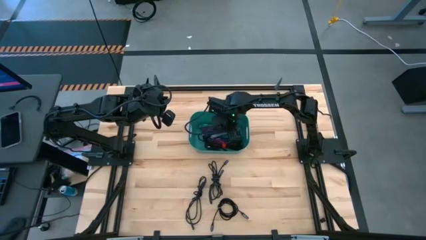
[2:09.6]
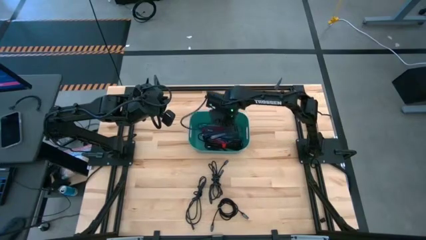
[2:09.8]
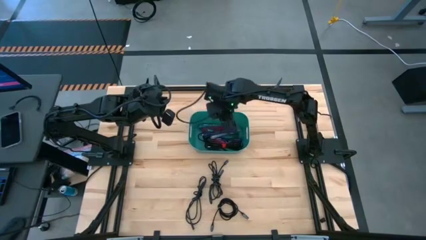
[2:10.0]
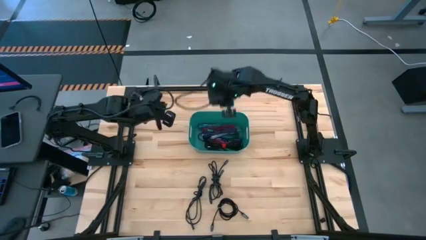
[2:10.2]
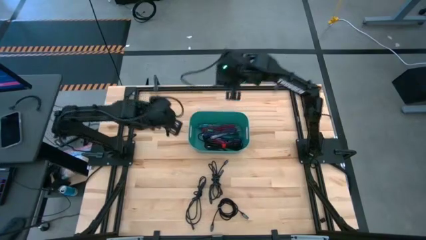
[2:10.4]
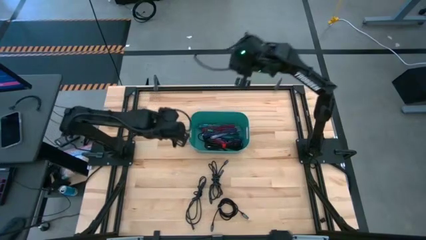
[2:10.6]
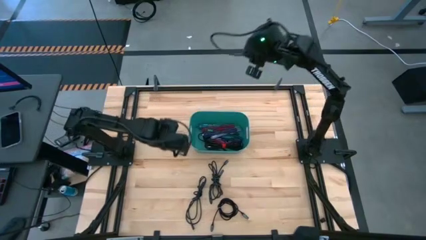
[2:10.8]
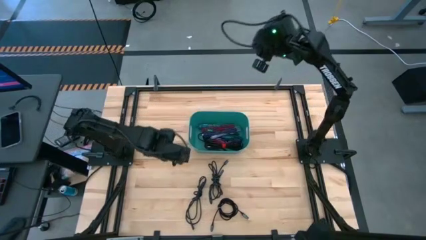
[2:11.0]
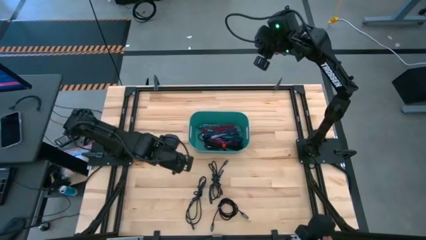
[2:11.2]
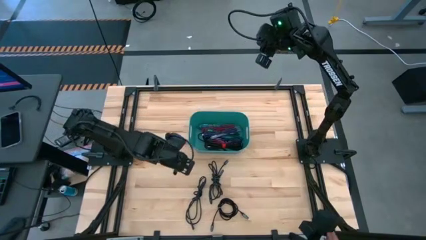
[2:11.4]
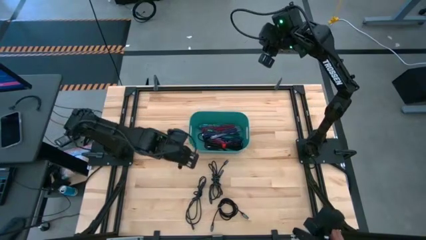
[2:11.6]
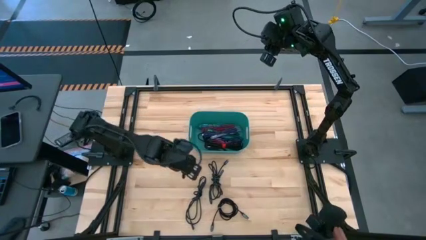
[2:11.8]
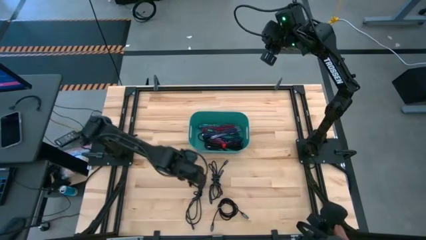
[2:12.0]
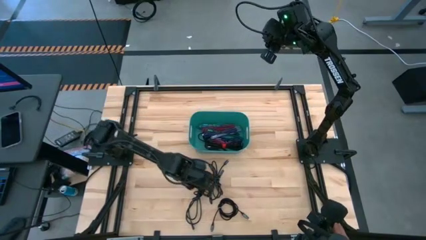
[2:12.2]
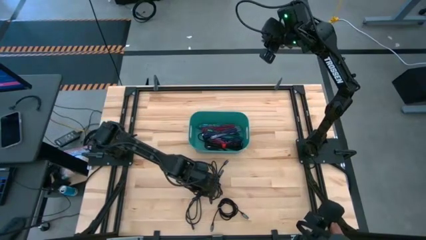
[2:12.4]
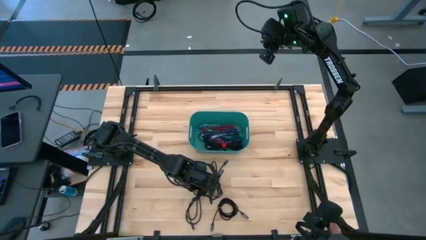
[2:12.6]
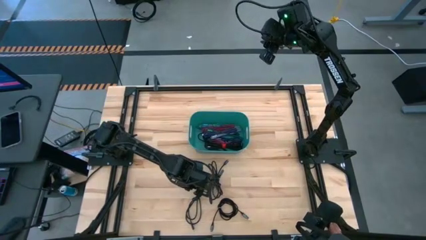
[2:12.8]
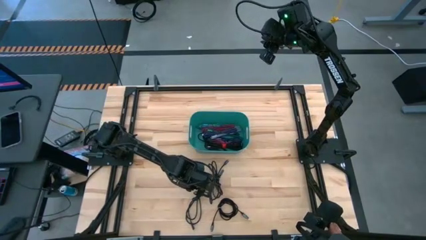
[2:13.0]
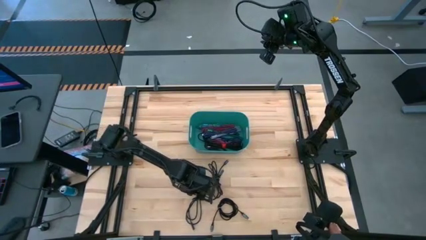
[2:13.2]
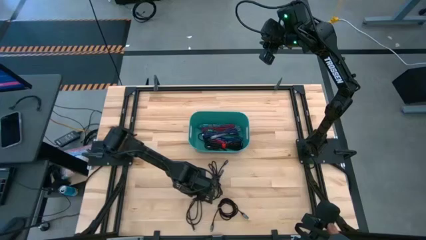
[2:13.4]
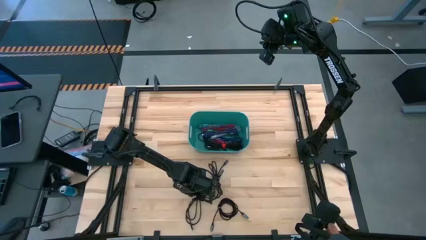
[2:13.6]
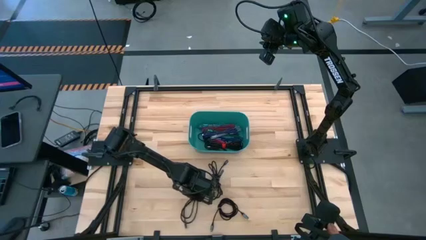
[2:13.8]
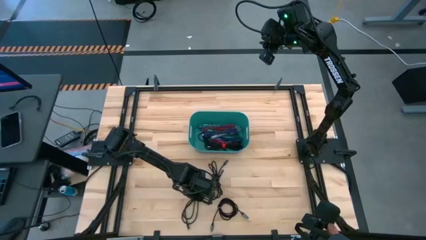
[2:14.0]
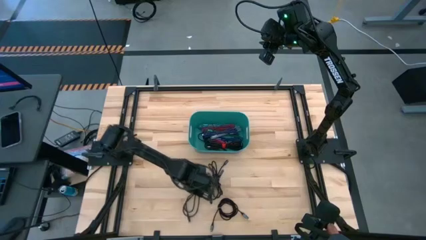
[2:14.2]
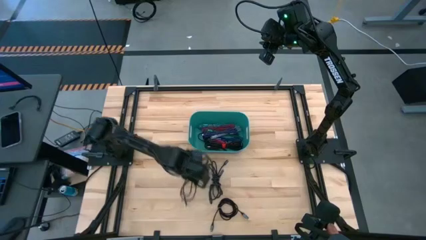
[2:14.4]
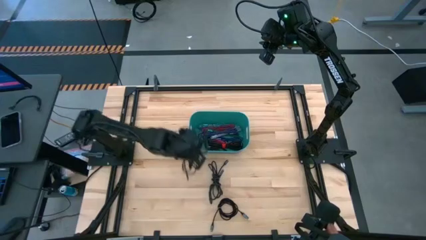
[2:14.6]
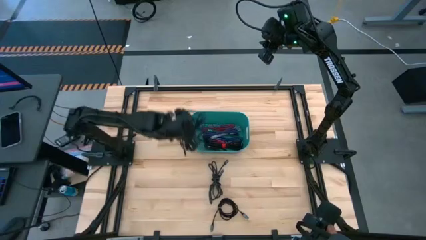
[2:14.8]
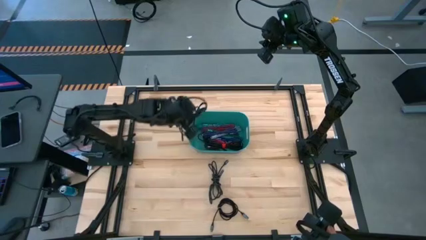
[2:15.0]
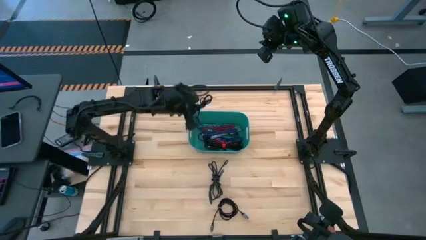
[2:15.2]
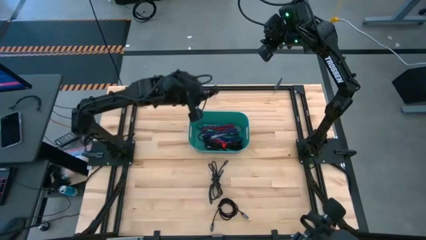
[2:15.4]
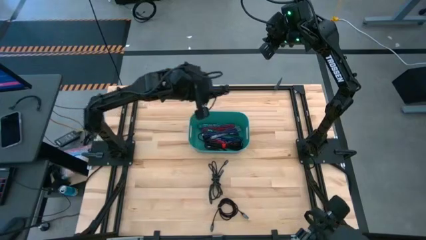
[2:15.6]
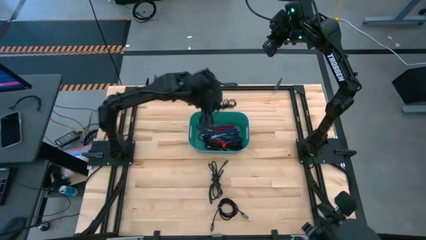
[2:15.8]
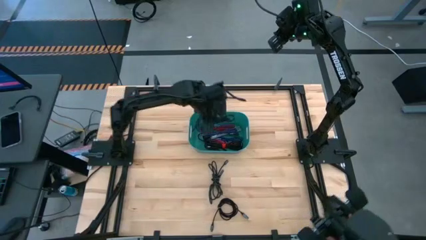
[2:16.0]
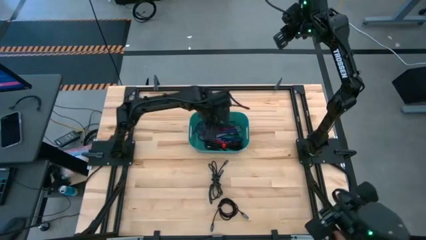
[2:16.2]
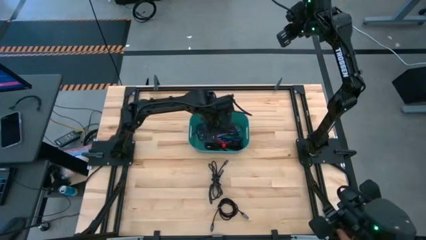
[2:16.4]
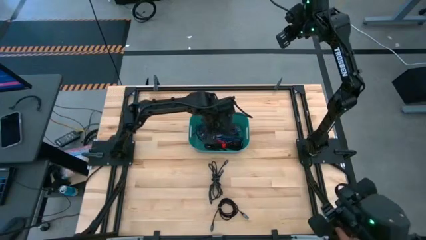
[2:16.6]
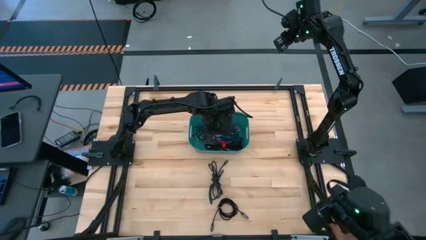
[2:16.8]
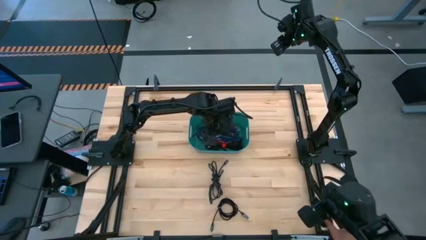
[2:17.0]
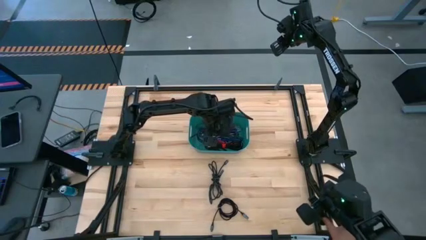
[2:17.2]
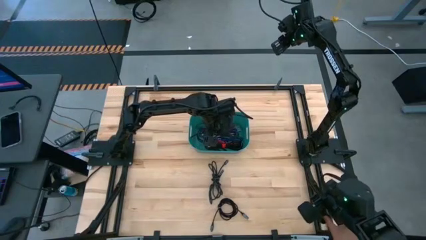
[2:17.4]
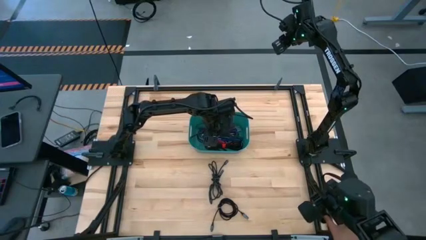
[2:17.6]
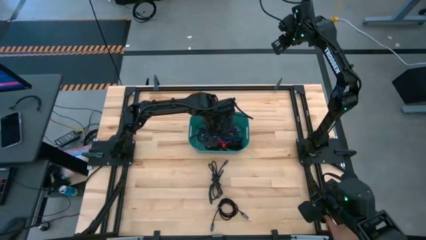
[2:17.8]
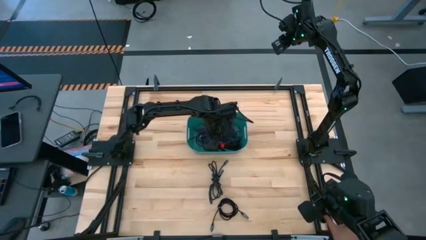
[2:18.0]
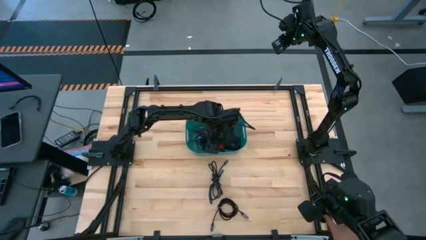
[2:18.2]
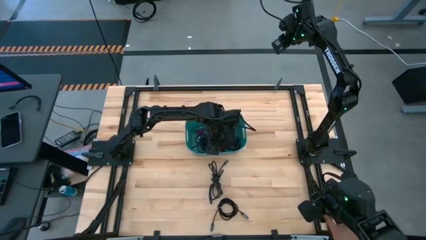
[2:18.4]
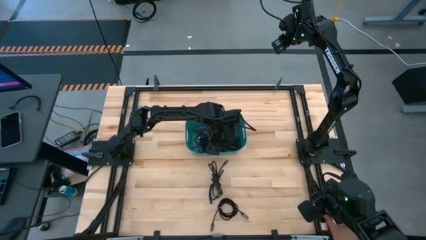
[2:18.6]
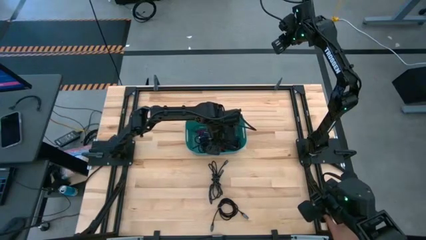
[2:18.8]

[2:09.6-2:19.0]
Task: Pick and place USB-C Cables
Put the left black charger cable into the light blue bin

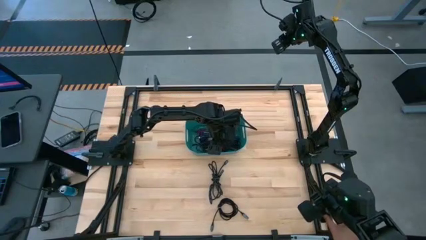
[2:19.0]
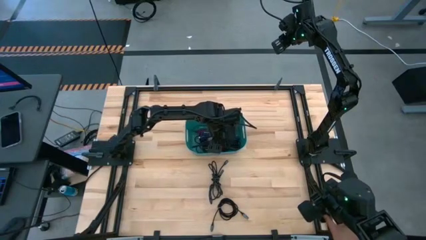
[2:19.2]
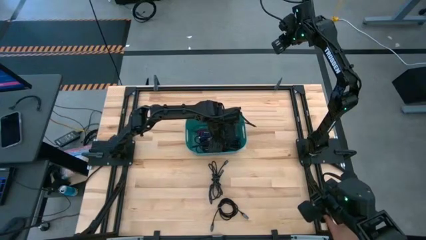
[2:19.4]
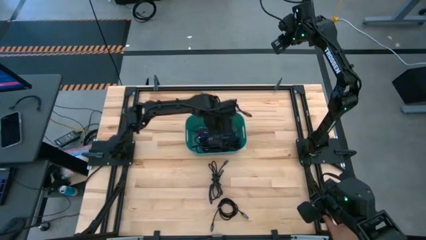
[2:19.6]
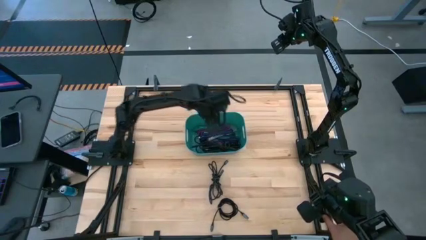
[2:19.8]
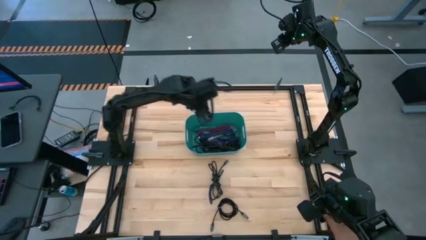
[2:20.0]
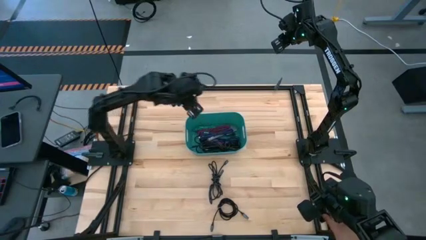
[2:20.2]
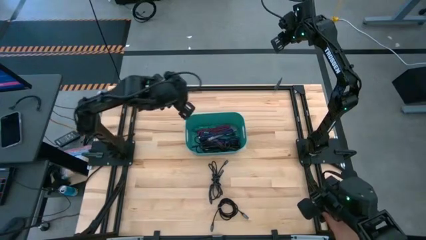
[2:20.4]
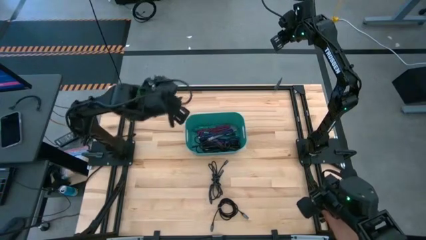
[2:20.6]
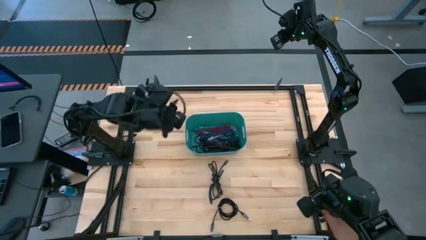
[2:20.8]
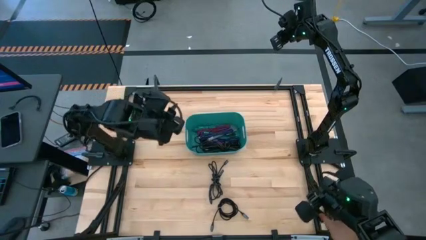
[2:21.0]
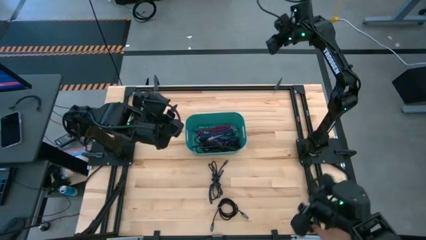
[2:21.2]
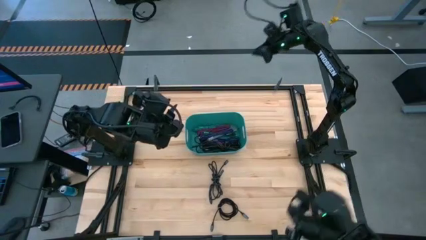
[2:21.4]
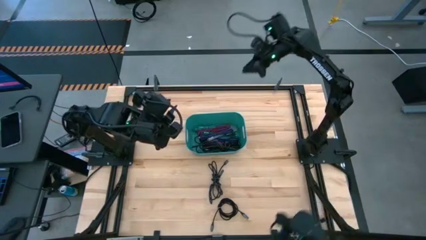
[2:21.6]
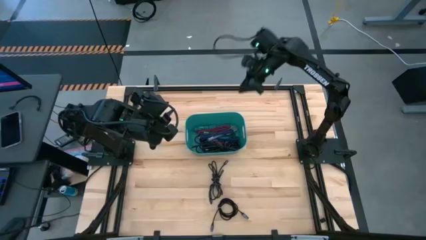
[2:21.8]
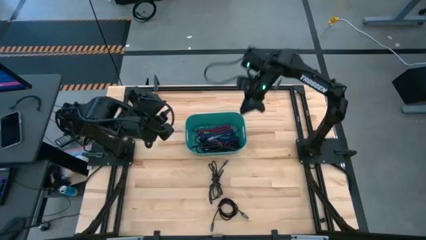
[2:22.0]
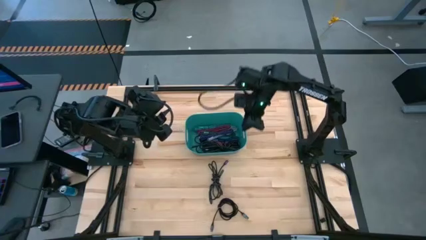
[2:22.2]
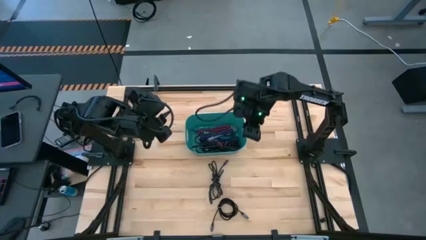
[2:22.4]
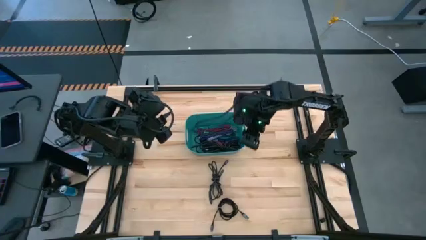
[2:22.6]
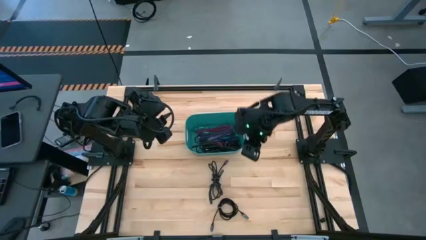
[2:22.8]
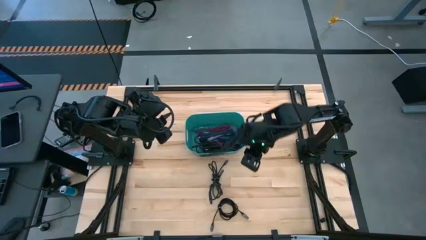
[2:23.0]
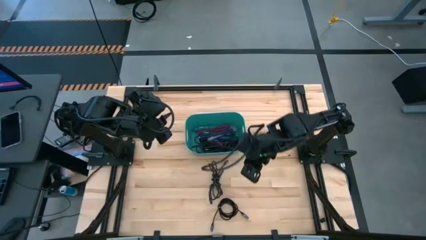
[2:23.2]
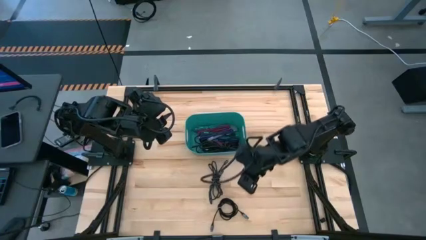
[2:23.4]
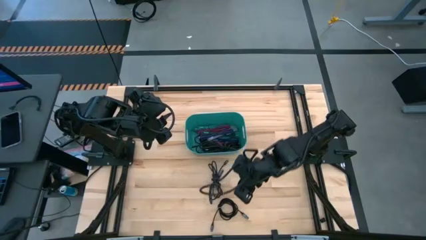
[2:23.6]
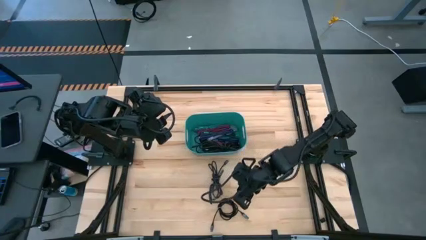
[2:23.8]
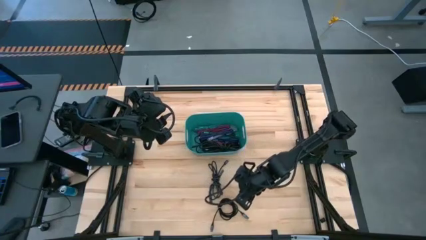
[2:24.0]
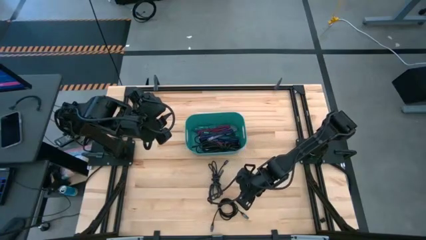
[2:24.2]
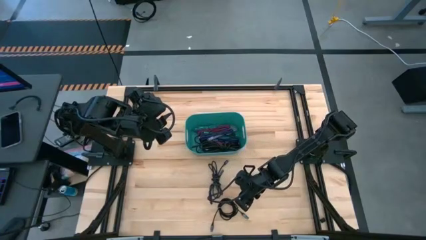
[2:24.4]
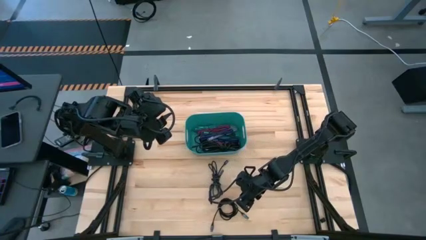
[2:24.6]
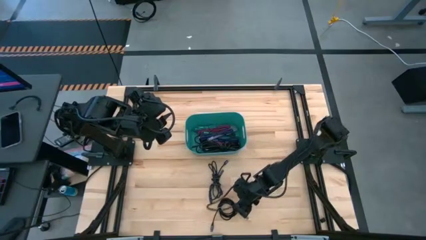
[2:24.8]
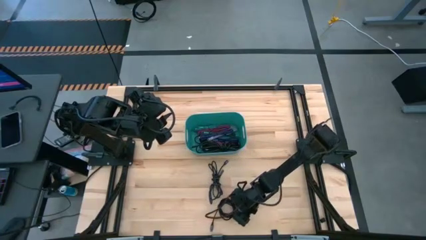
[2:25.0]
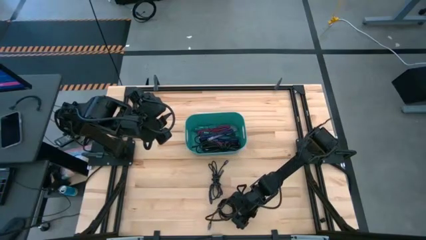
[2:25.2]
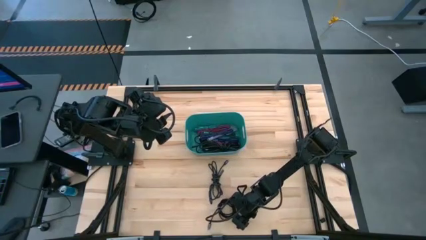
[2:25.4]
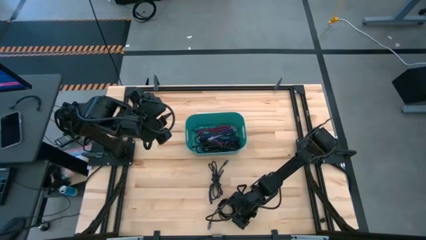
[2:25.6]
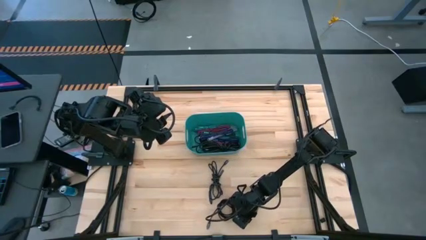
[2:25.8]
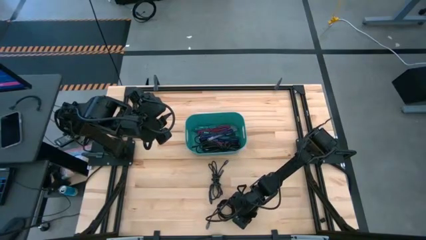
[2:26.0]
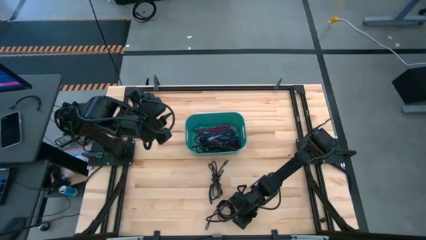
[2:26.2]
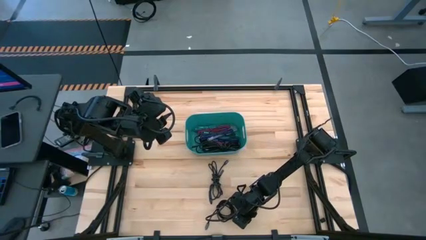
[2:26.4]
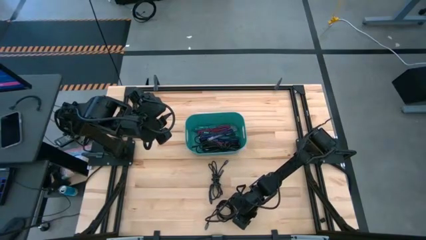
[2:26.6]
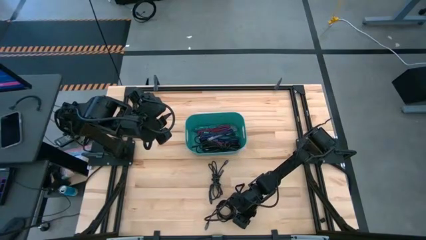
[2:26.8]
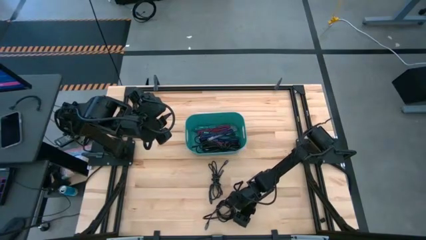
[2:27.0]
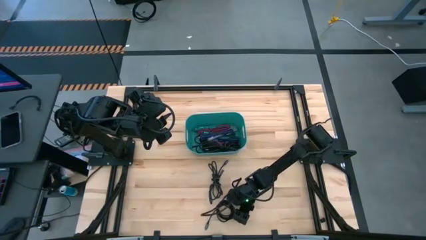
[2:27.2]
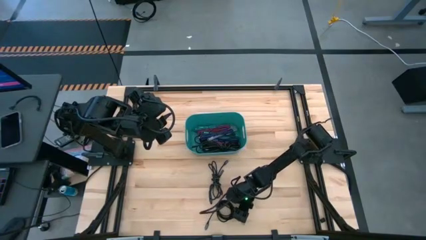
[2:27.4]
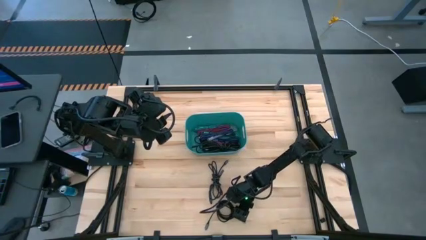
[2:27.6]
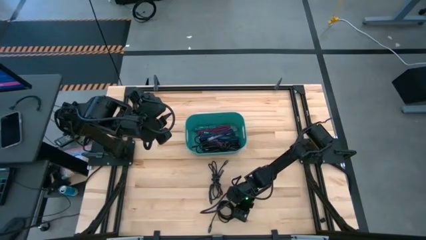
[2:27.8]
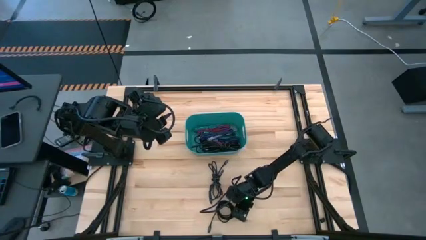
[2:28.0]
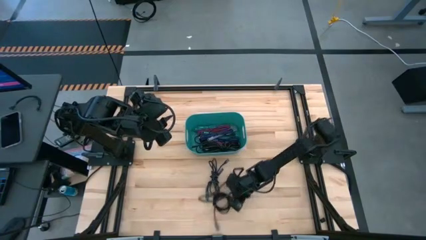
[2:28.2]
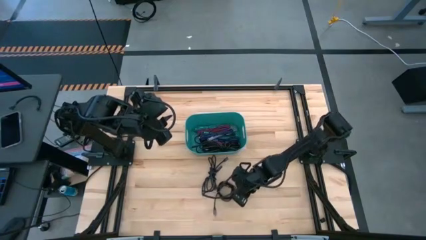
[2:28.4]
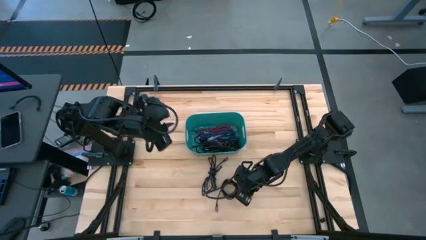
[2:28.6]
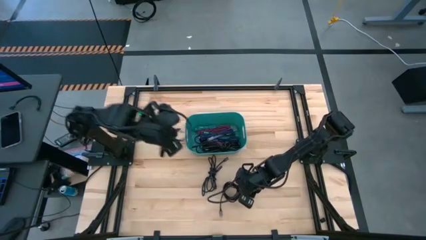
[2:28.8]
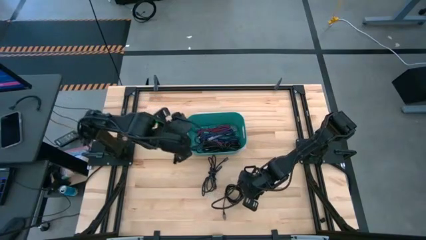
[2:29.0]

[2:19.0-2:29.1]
Put the bottom black charger cable into the light blue bin
